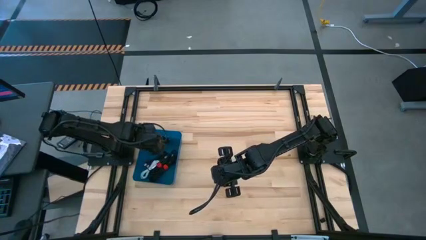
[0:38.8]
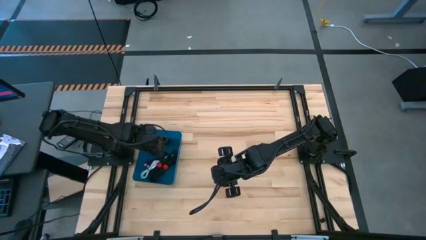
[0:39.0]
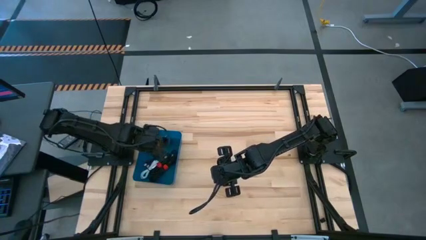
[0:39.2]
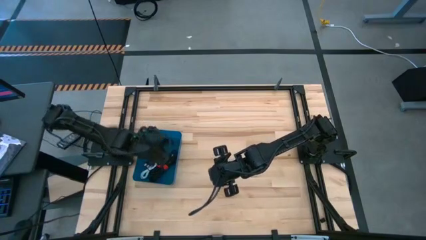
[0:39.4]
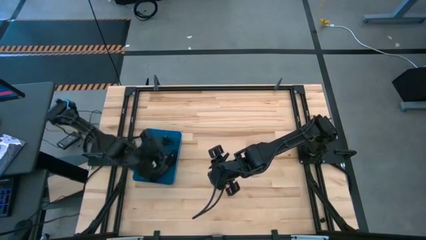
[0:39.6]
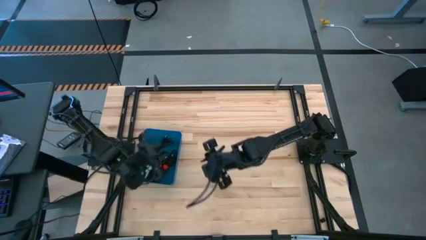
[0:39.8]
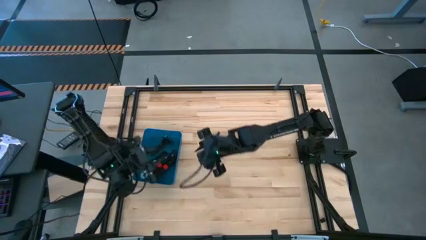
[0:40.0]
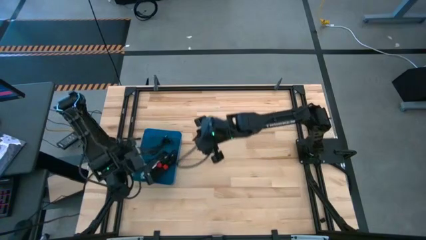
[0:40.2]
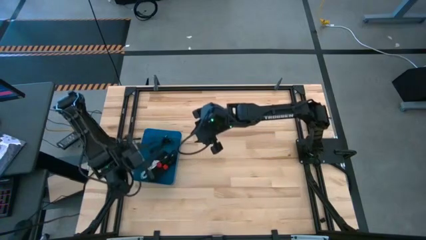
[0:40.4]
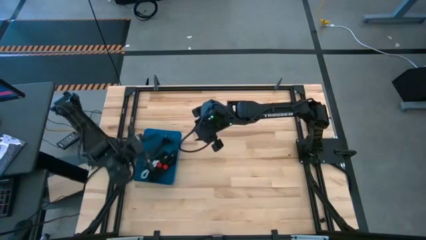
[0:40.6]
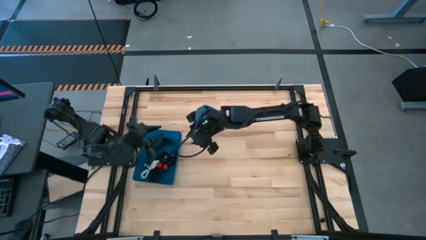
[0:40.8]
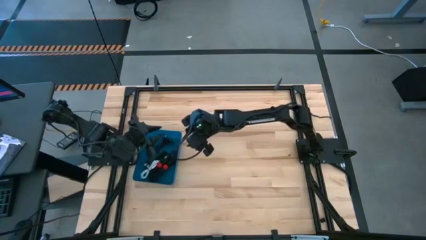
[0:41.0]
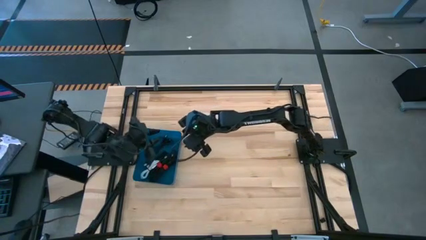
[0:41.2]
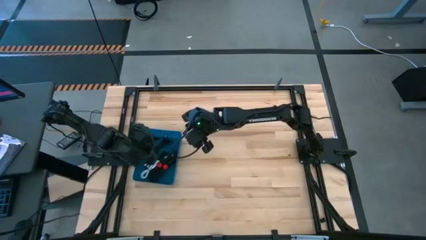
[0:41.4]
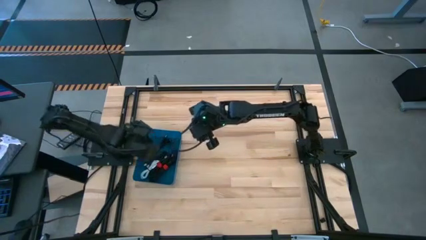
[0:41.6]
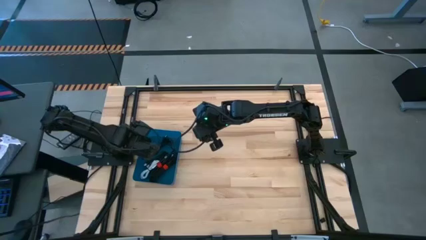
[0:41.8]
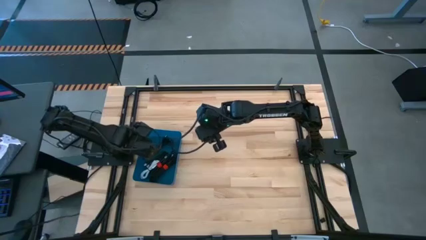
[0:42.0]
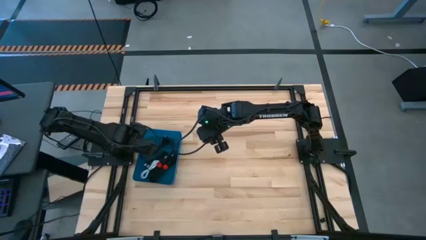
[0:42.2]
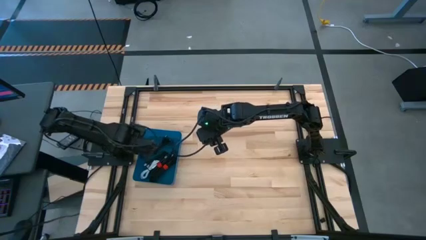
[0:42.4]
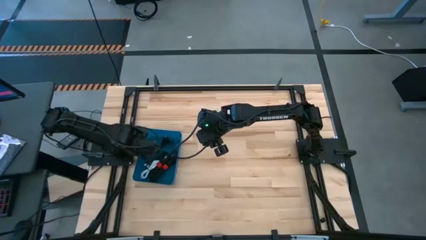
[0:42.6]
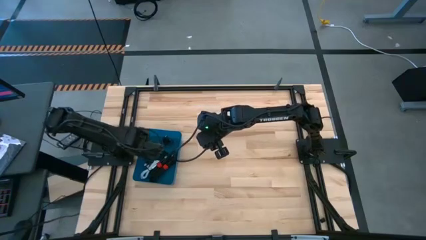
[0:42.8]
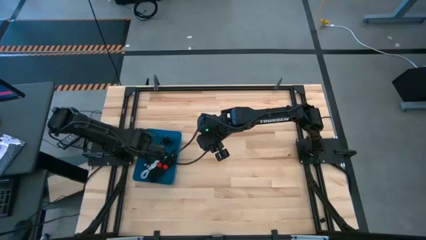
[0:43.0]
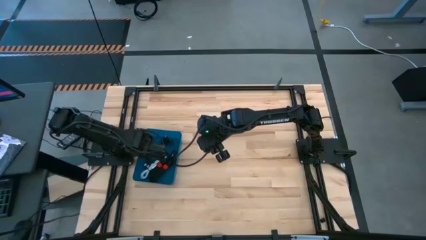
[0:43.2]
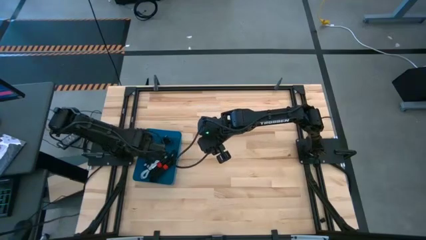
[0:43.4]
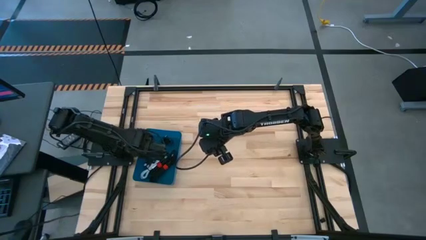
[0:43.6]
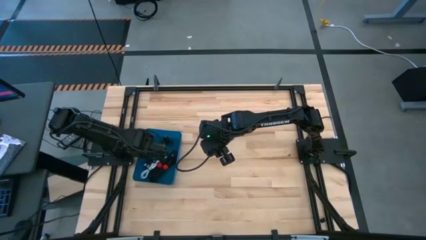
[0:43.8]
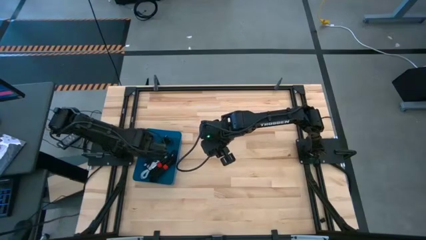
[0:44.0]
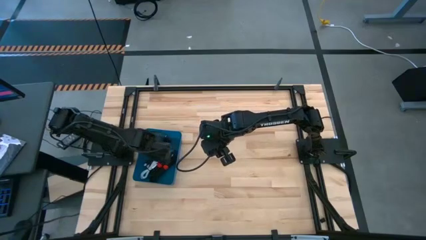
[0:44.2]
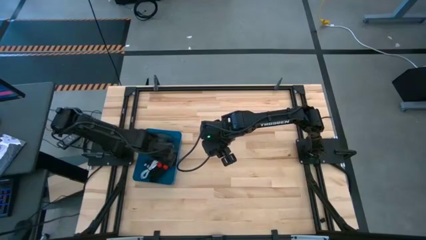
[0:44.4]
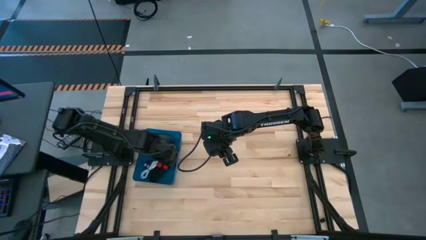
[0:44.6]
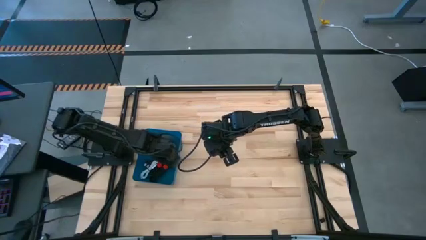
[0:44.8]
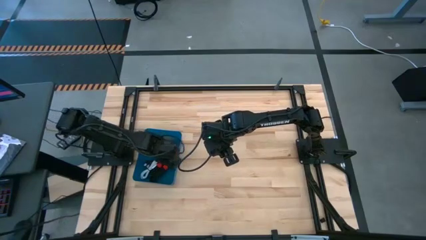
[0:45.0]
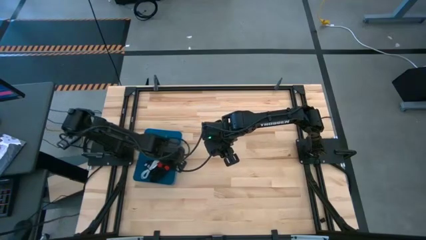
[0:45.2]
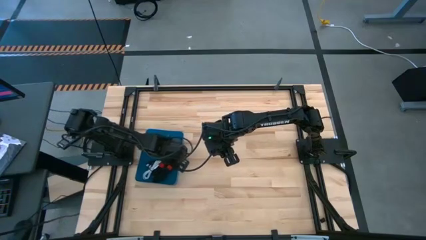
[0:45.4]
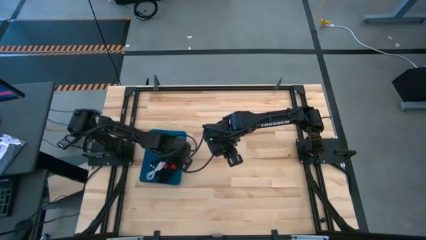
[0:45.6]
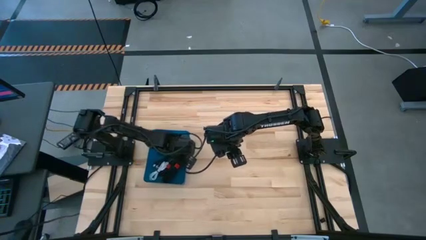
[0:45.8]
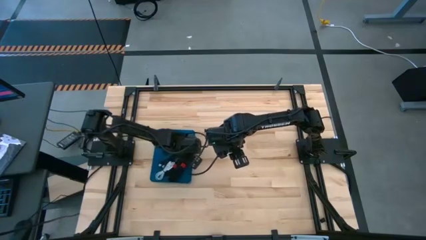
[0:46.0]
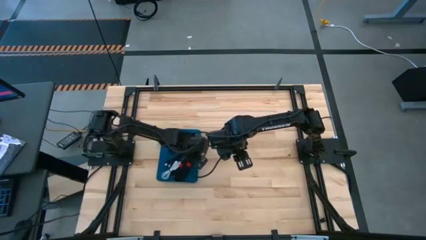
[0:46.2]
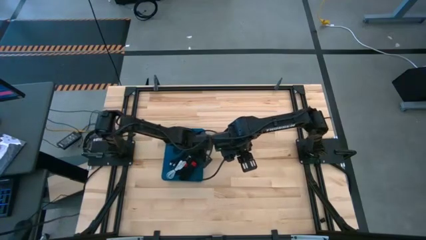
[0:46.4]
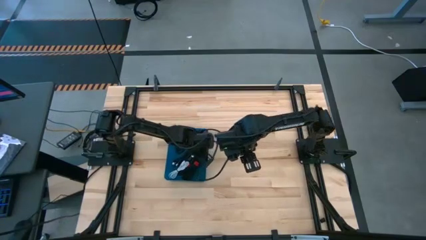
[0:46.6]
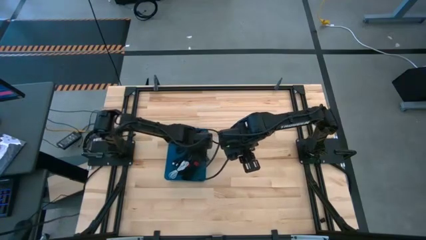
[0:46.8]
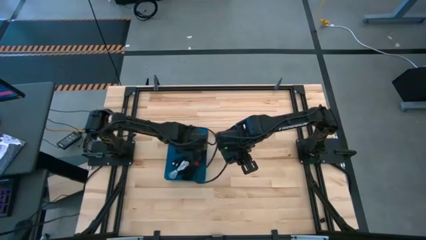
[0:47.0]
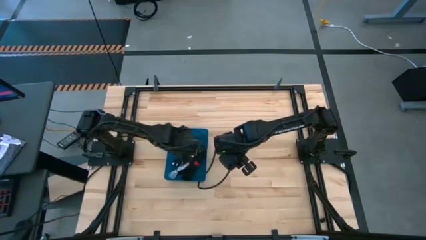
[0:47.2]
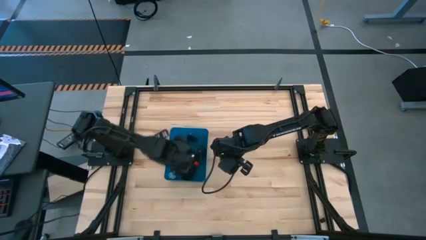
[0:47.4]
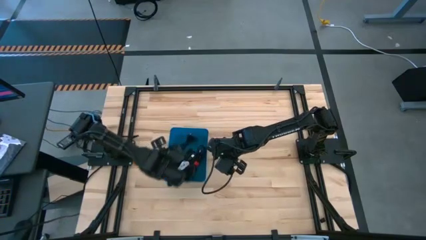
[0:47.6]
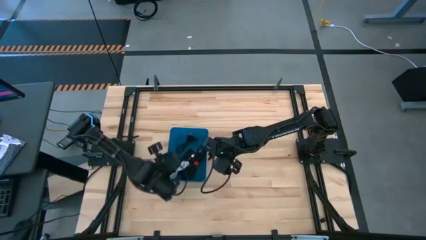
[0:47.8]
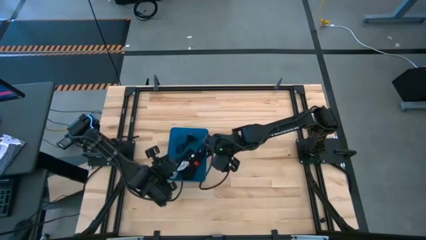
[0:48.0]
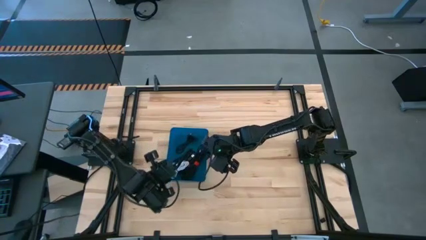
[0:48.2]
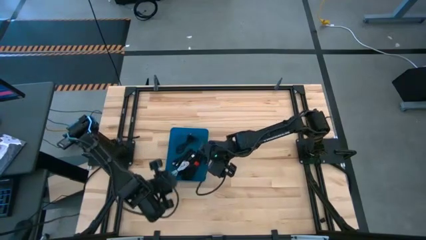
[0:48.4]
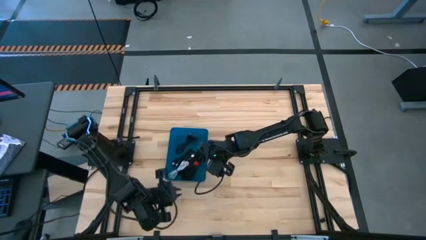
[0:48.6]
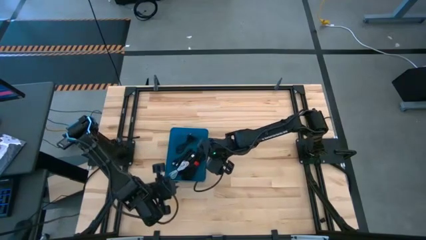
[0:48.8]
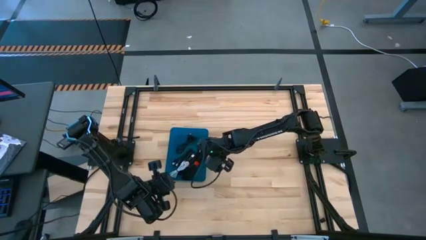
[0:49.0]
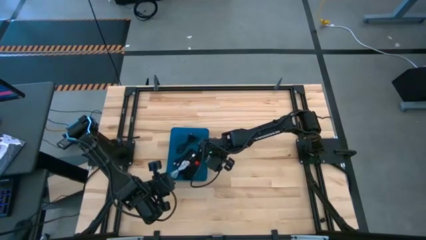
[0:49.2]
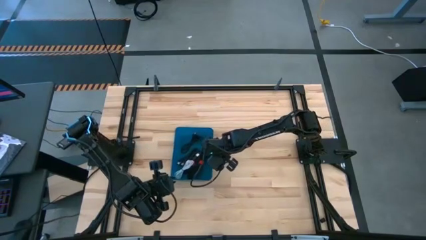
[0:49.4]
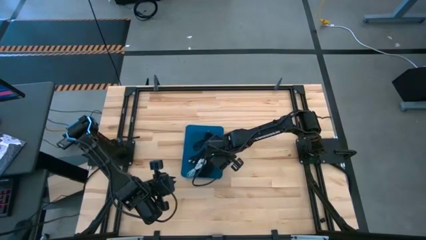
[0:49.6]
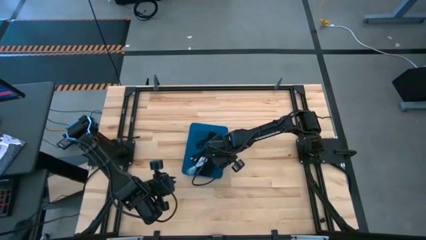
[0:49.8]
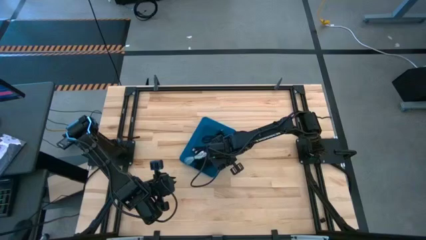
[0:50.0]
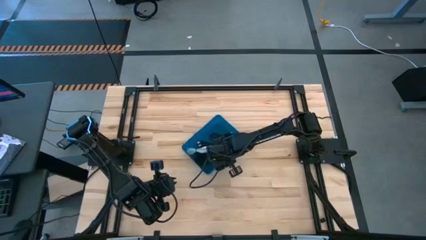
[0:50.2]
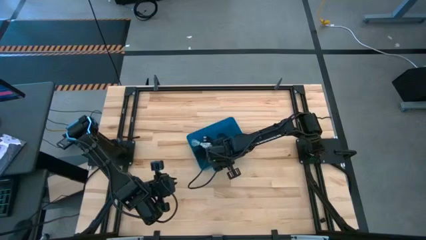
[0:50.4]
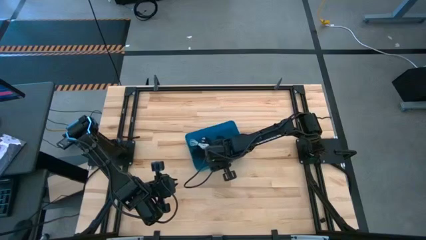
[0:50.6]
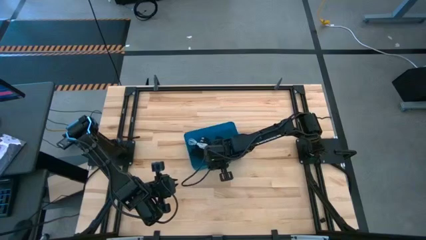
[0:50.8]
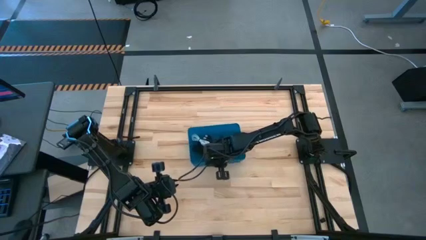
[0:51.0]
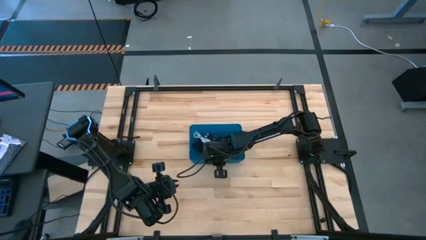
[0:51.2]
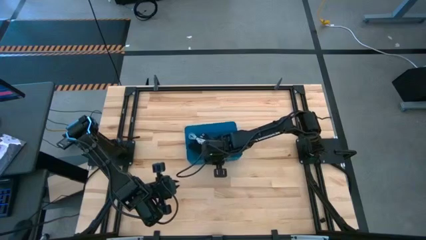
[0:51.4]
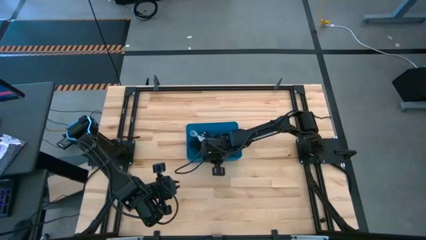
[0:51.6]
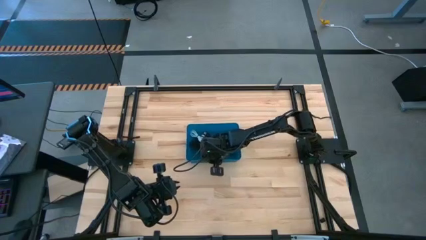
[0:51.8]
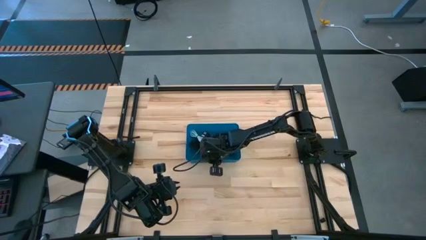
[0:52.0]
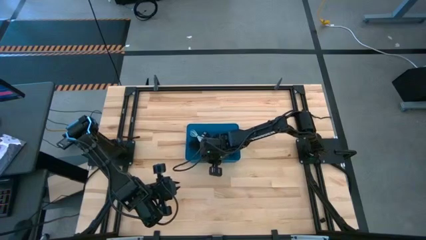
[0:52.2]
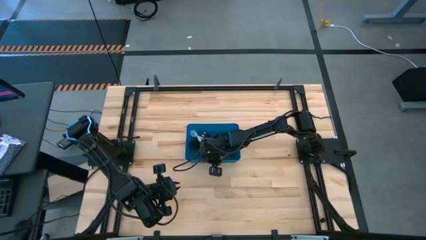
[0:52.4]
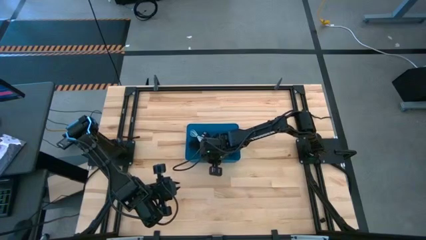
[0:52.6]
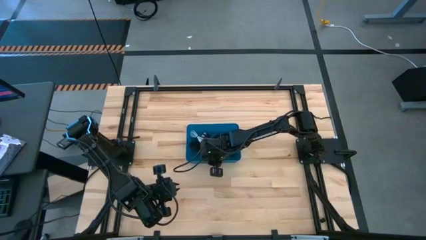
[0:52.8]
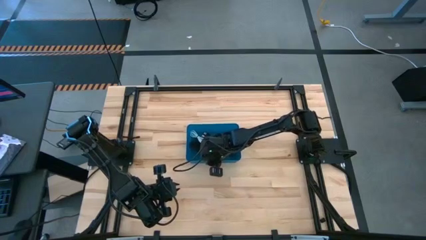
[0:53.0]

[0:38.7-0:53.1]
Task: Pick and place USB-C Cables
Move the blue bin to the center of the table
